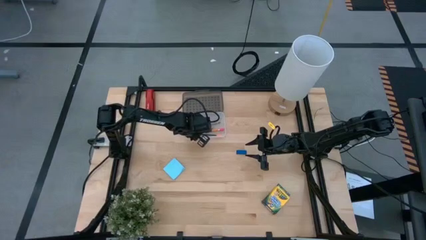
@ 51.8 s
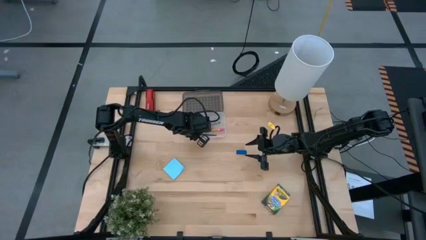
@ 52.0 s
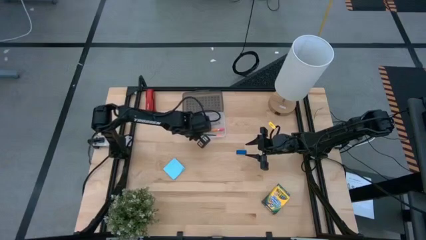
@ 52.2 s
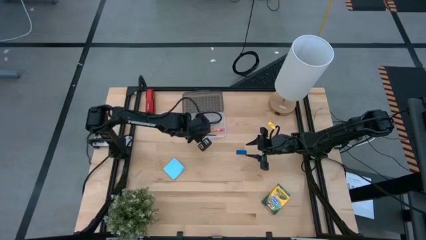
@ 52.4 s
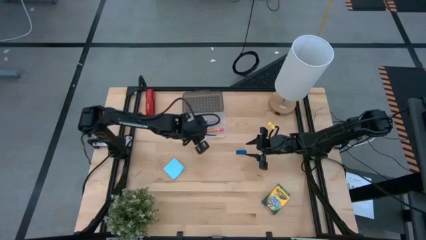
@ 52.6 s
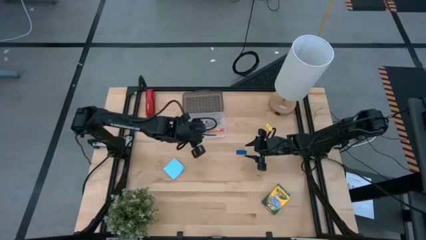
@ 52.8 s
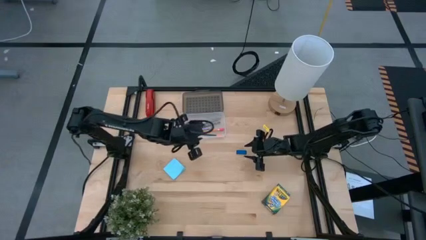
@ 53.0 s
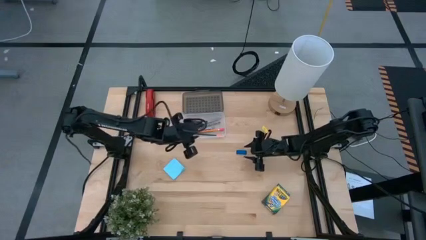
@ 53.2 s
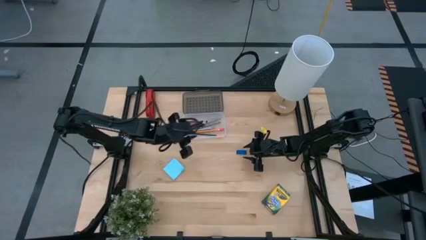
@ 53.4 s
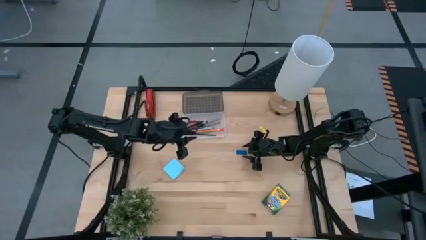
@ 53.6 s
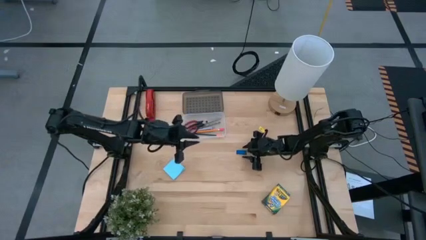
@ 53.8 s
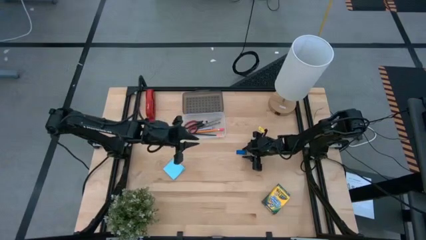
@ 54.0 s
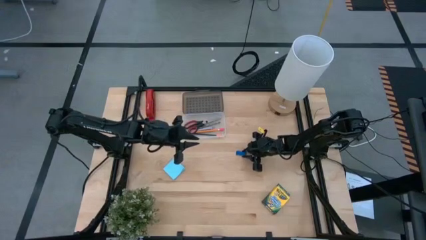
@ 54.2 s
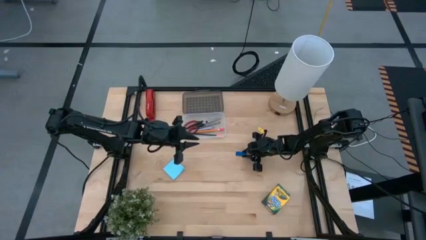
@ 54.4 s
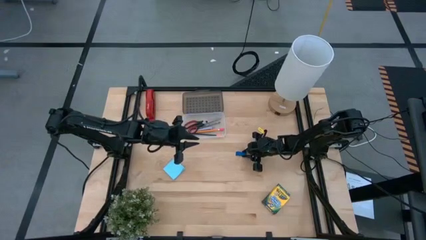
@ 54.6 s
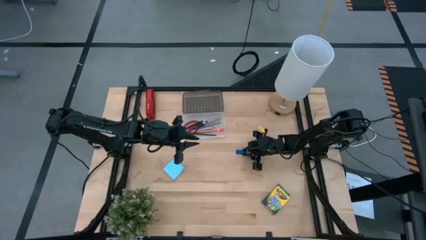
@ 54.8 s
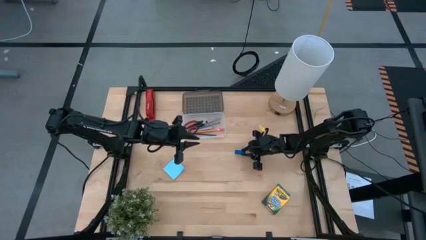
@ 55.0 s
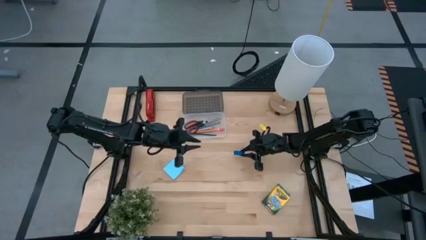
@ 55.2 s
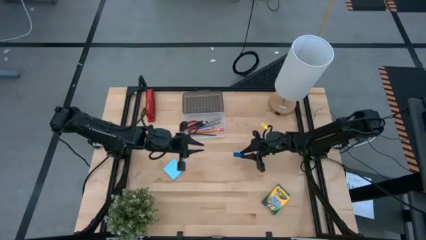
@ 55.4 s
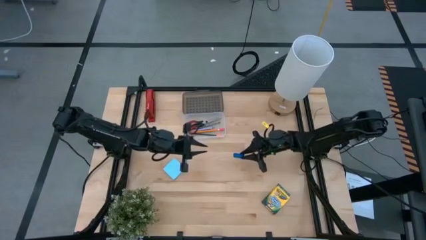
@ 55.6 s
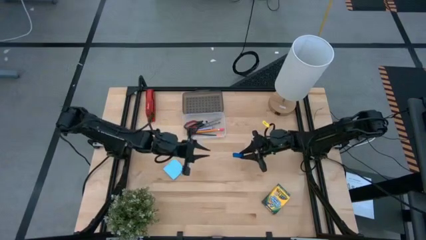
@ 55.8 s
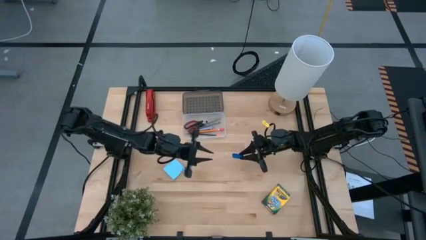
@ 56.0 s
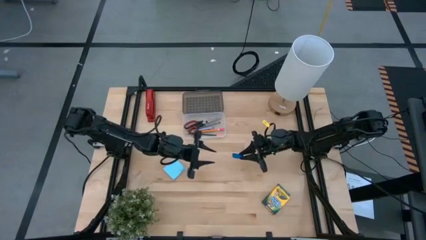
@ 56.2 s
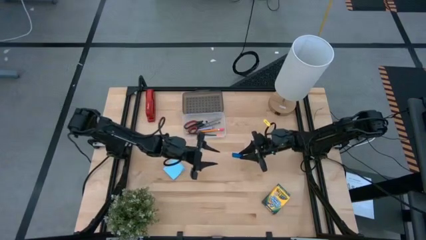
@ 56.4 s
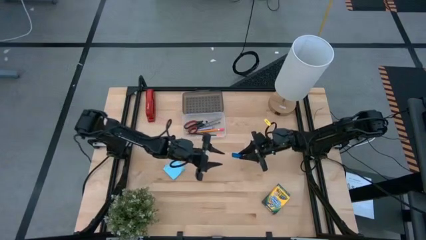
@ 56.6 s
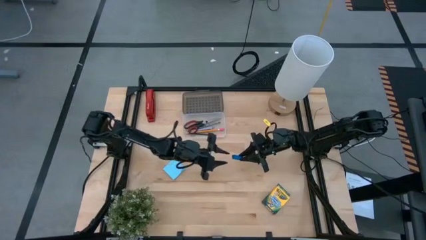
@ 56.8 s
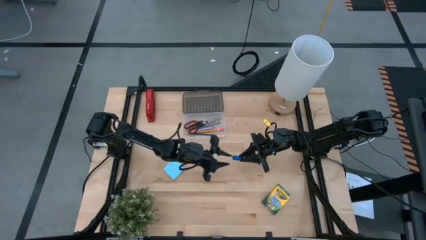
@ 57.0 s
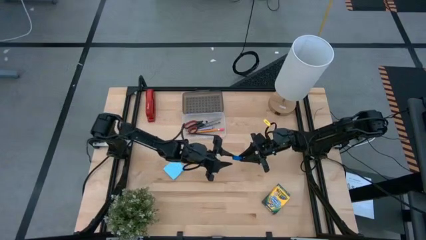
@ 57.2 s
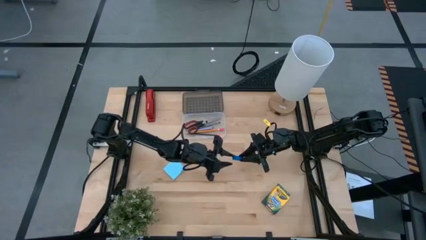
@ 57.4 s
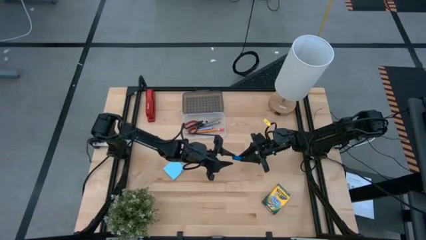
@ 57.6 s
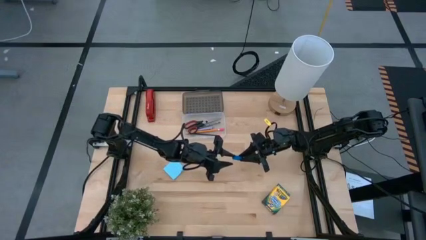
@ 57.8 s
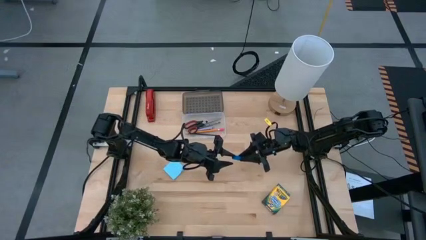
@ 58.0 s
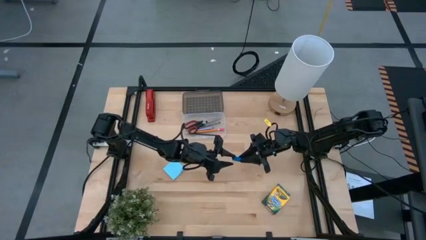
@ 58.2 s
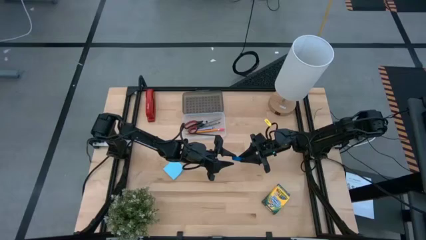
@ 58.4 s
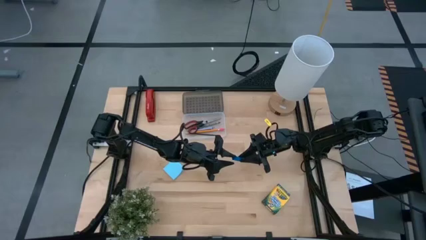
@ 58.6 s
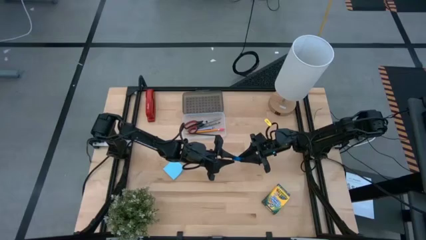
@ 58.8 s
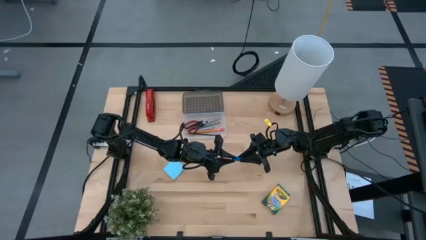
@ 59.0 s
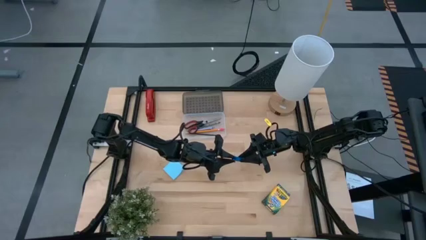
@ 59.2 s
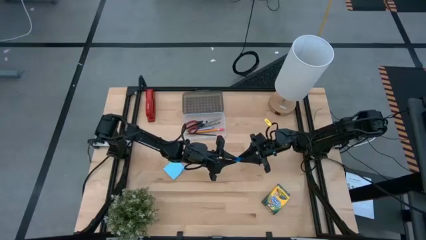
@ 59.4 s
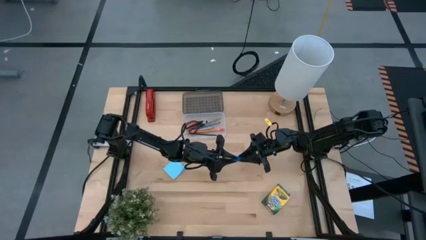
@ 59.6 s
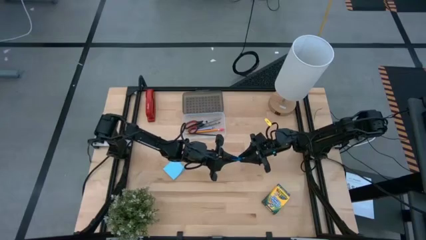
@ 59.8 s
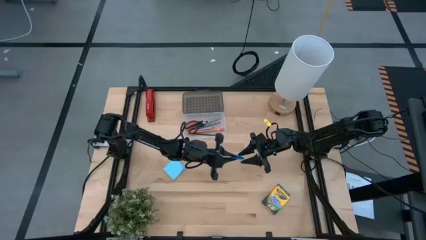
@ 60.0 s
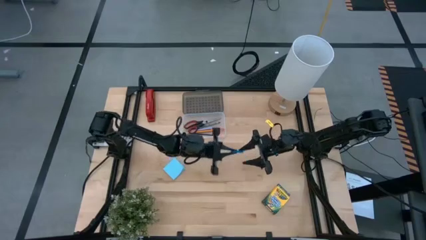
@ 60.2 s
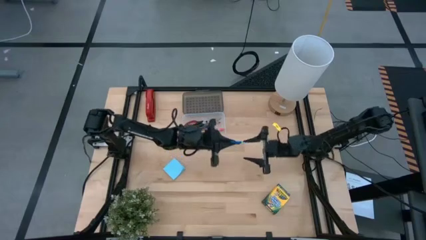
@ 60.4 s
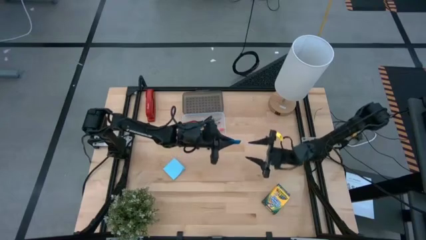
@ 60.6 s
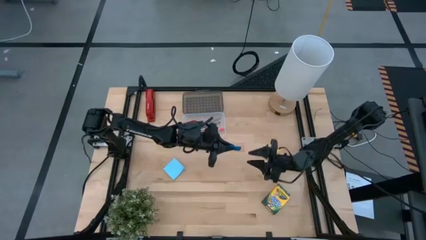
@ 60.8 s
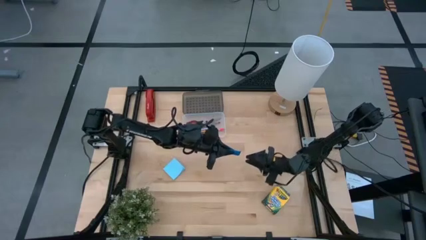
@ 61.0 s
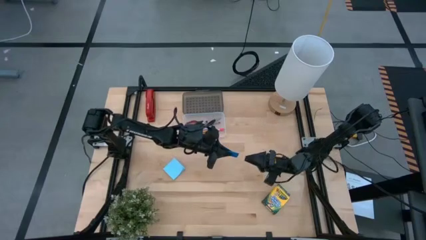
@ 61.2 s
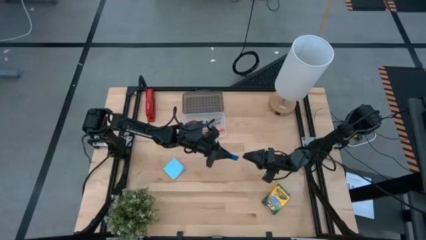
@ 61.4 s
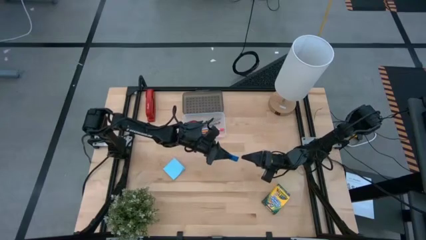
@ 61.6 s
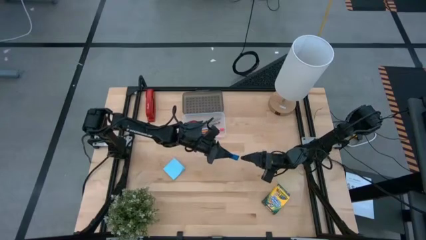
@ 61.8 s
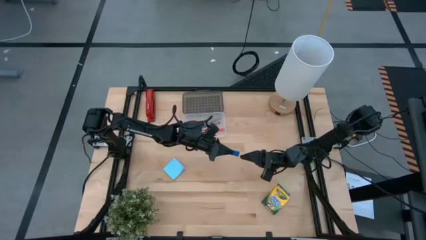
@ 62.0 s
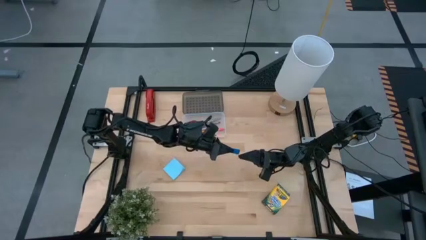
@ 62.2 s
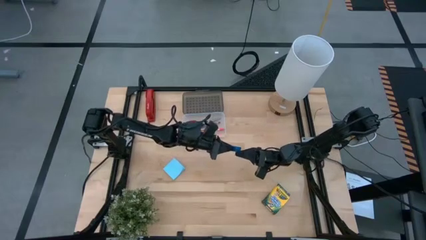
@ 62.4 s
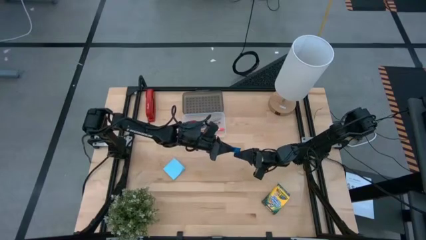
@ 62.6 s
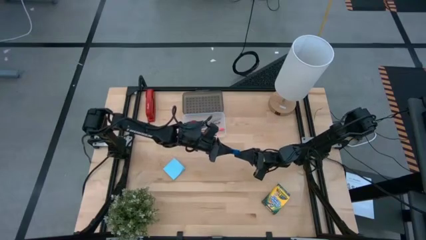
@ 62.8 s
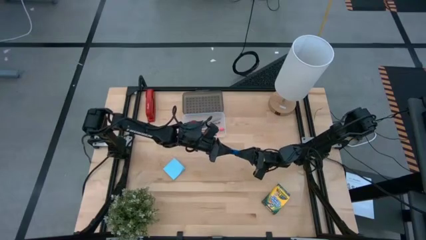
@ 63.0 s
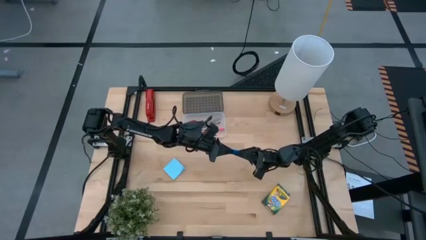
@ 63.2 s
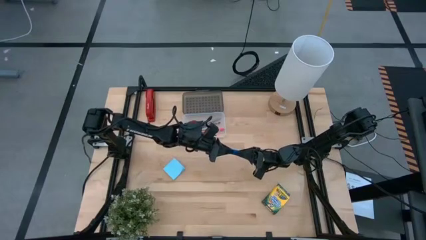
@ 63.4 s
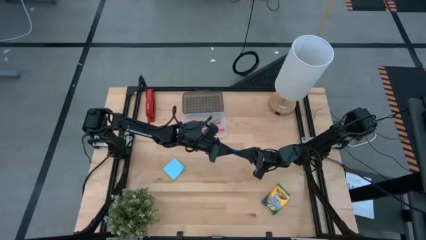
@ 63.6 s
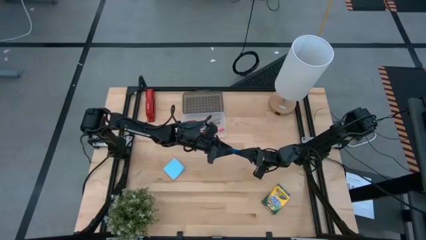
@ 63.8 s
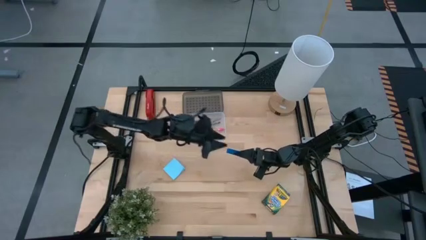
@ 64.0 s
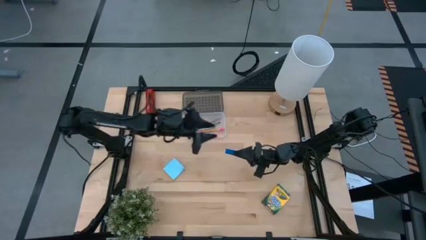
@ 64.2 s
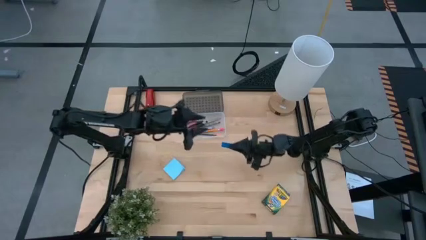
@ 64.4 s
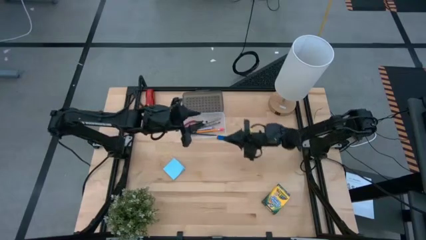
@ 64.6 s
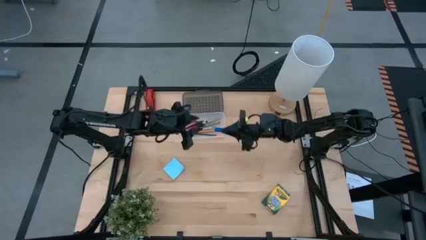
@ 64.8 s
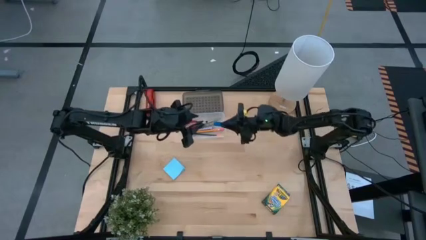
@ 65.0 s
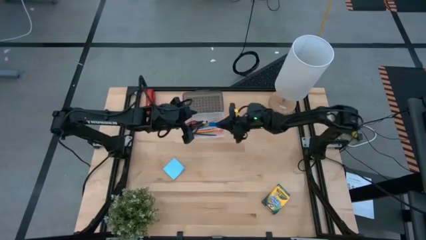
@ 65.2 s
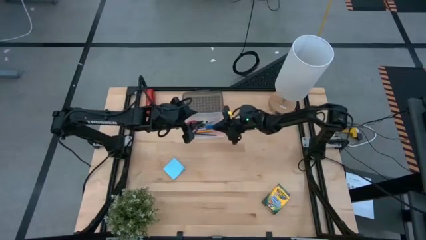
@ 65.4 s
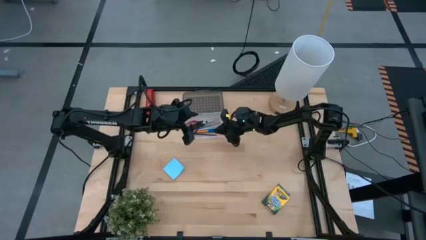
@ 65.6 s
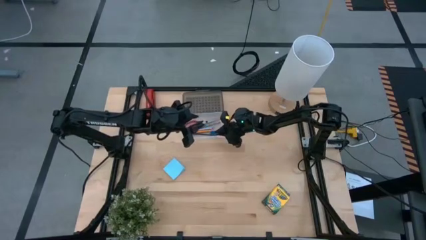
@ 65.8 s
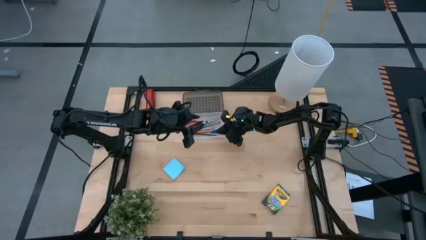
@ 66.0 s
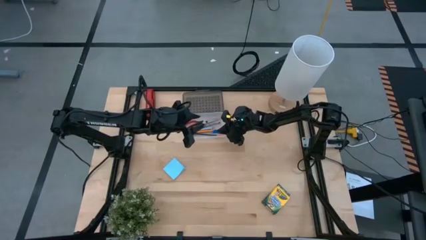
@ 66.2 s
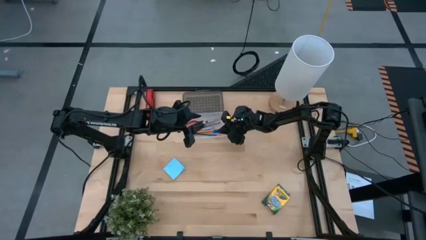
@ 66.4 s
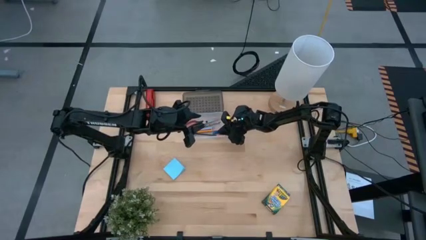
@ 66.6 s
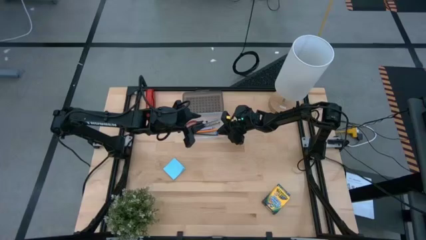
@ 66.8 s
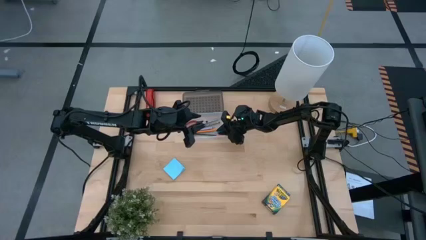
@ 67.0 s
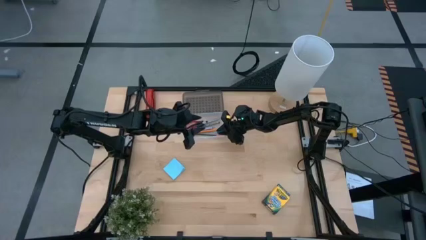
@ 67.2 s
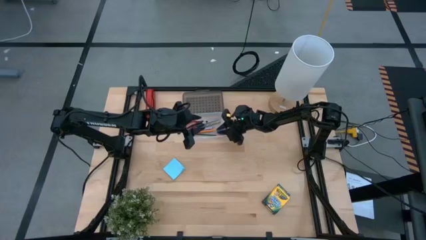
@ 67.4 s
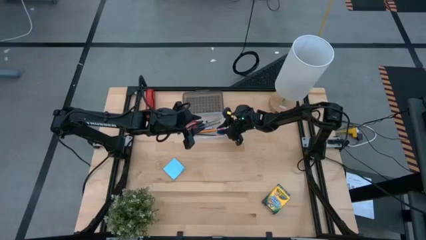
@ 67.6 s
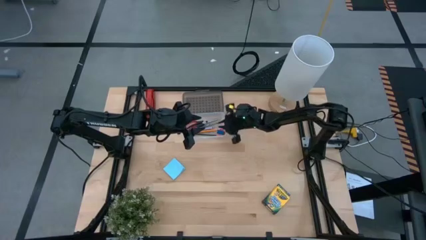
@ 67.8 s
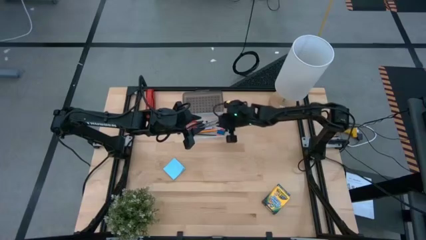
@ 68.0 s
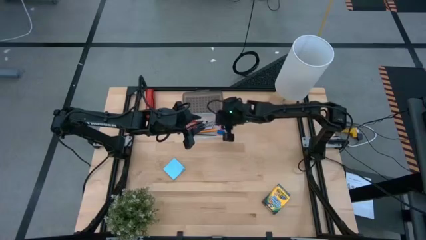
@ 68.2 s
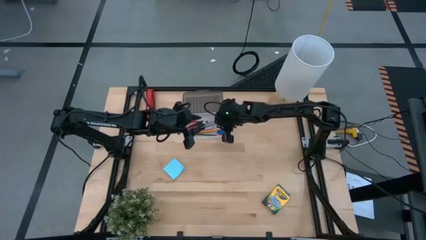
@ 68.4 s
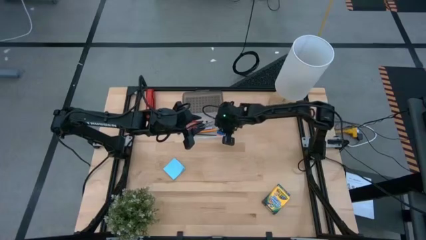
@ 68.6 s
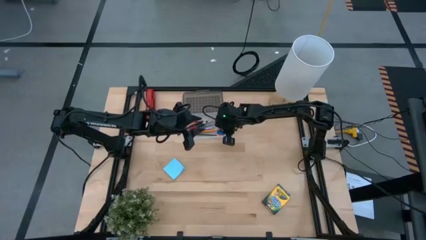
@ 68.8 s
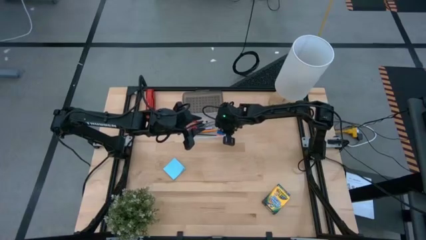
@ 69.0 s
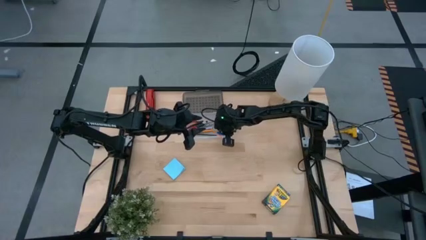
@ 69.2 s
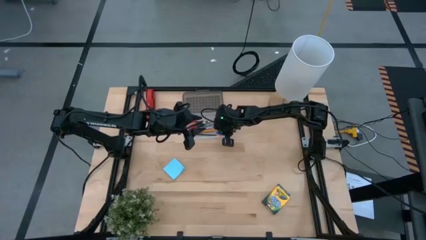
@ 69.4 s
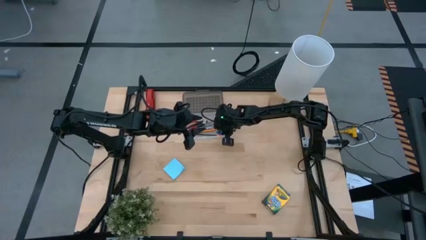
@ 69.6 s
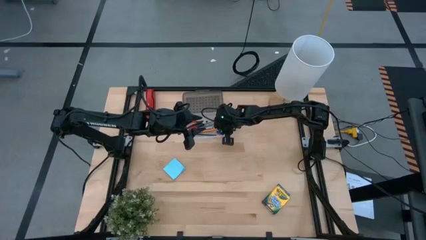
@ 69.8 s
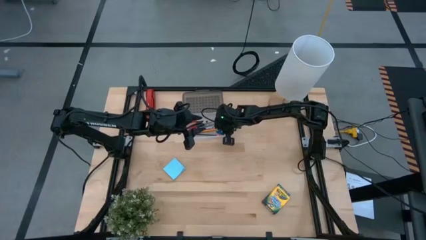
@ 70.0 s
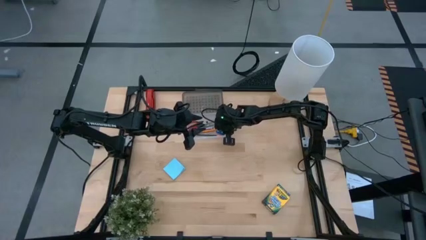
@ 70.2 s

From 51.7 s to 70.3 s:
Task: Pack school essentials
Put the blue eraser into the black supply box
